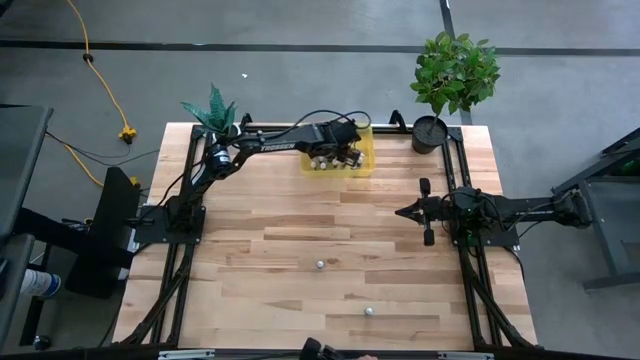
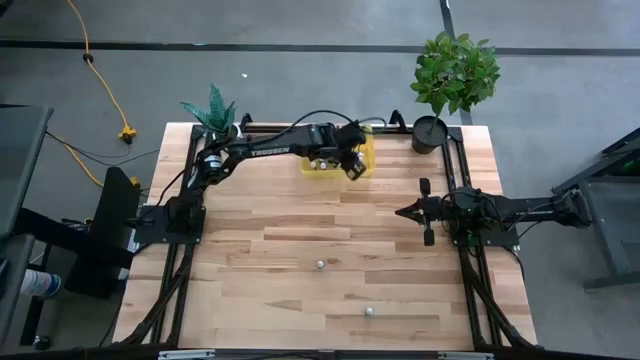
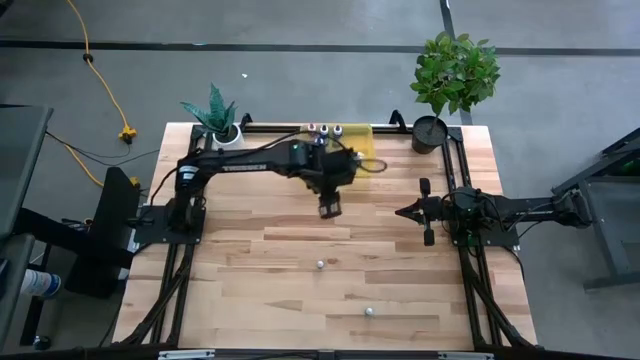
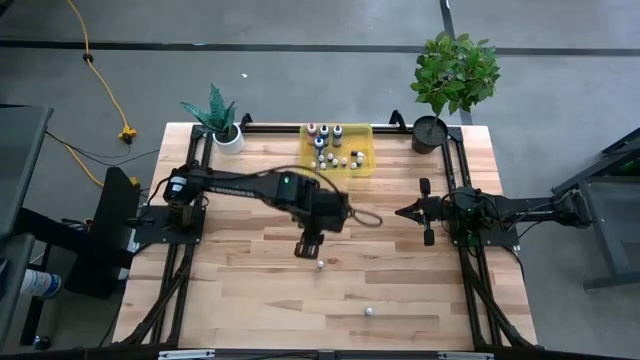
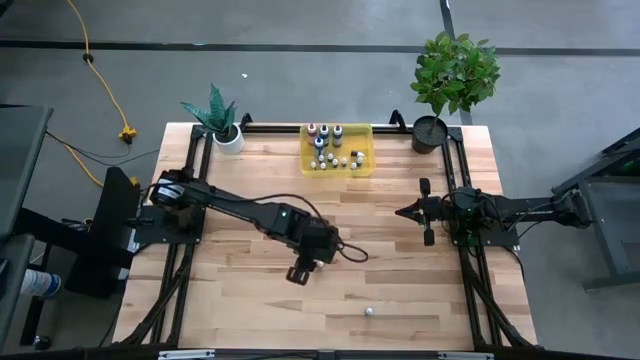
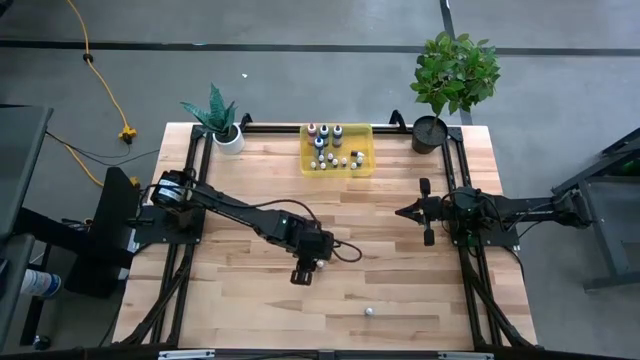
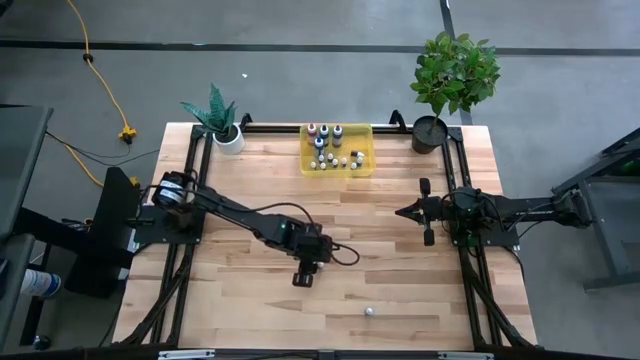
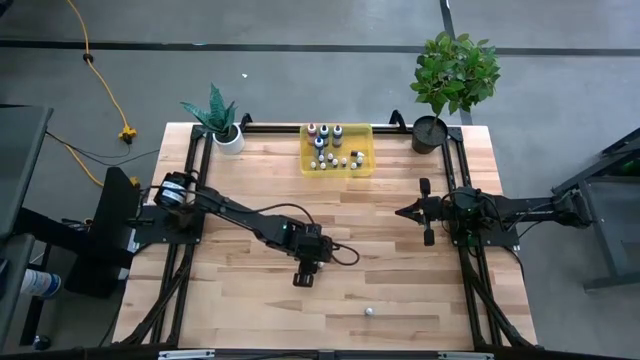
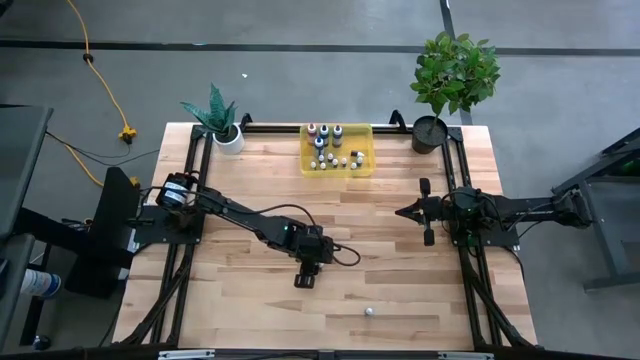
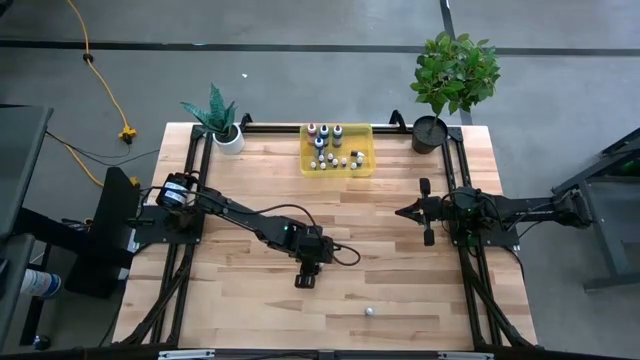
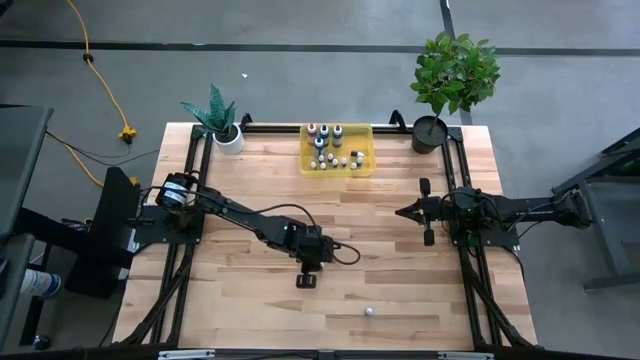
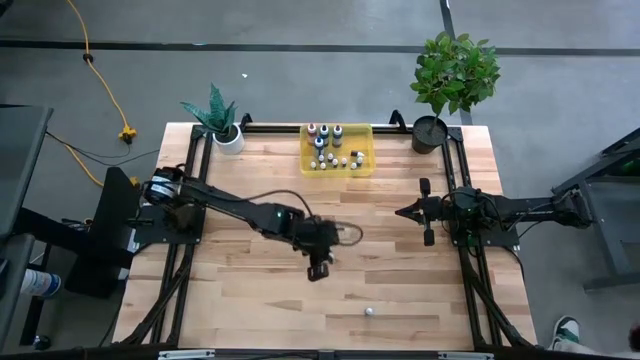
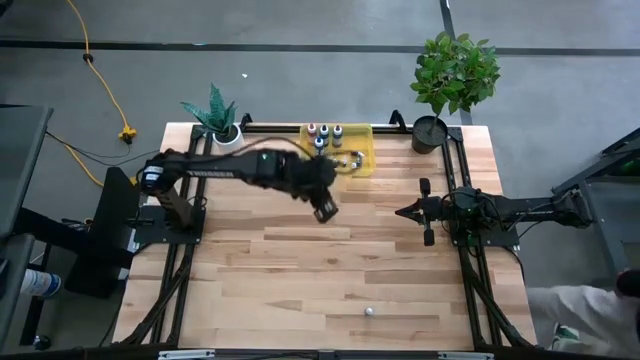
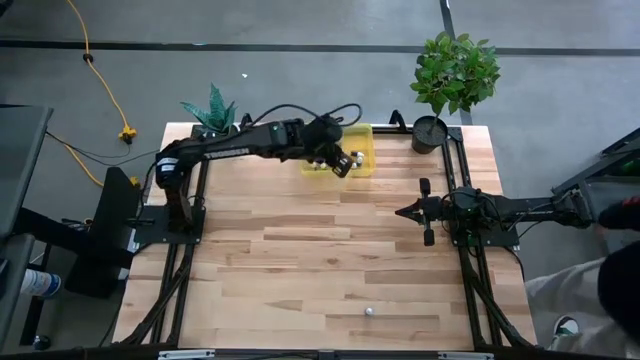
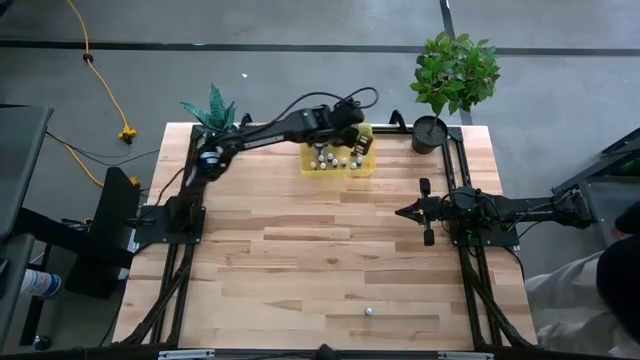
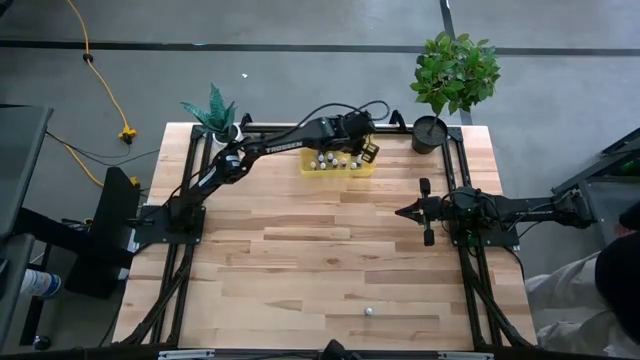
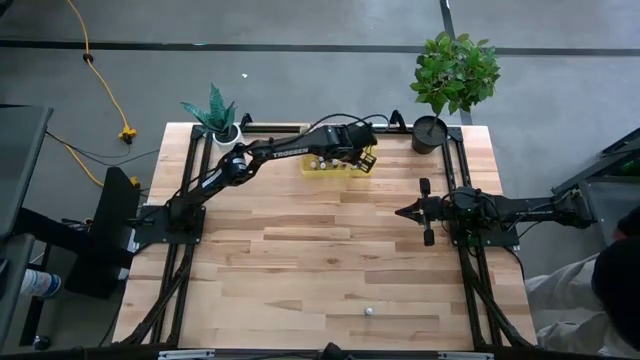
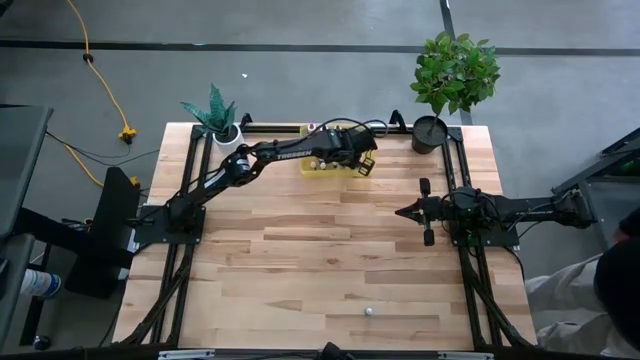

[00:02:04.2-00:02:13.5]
Task: Pick & Place food coloring
Put the small green food coloring bottle into the yellow bin

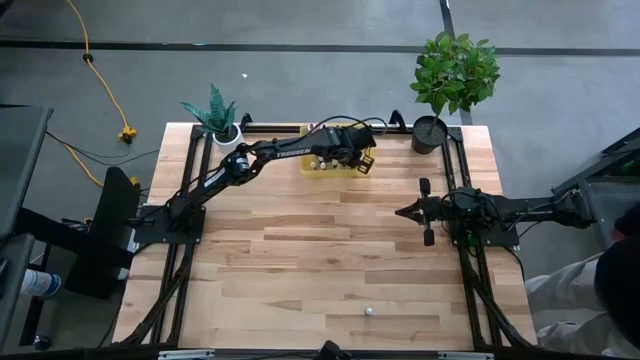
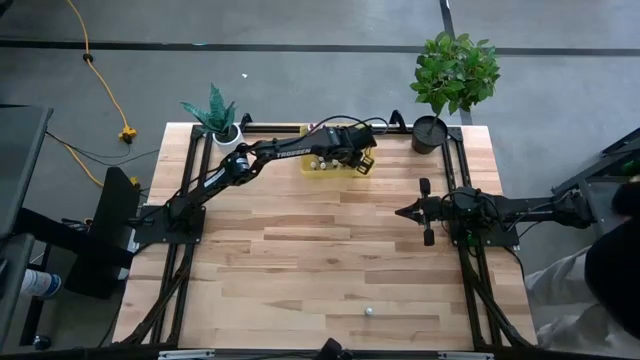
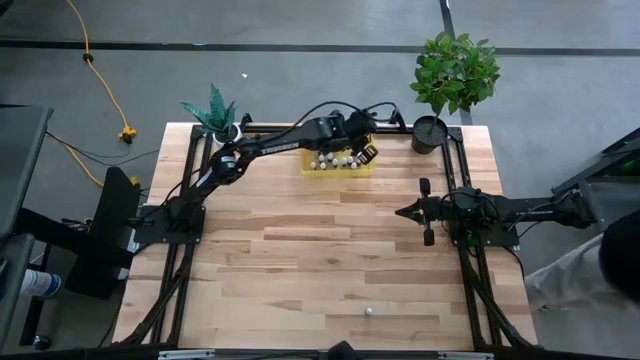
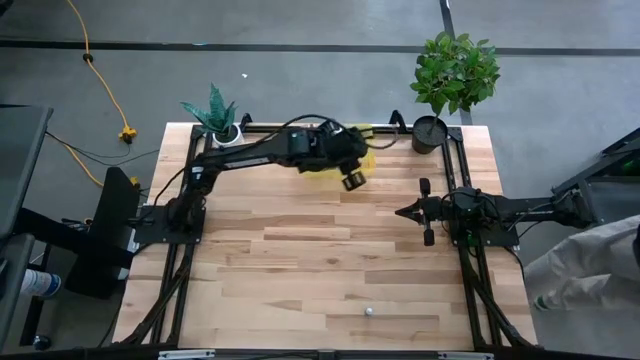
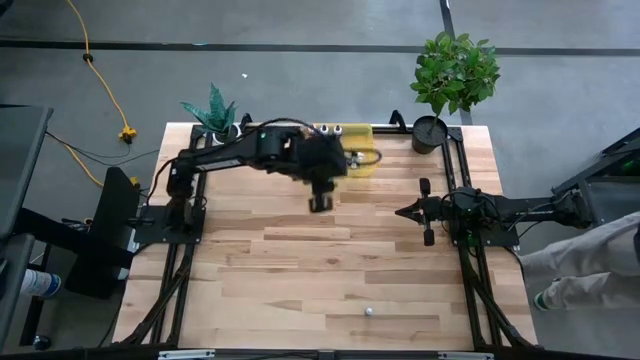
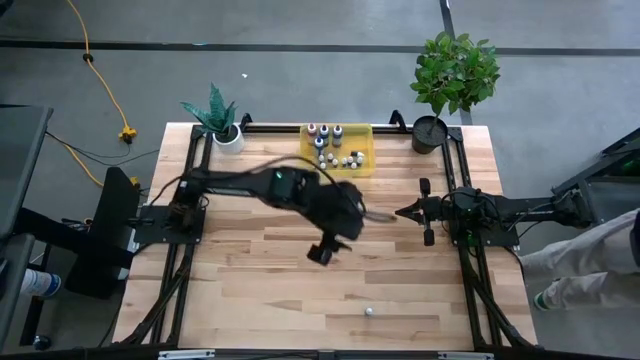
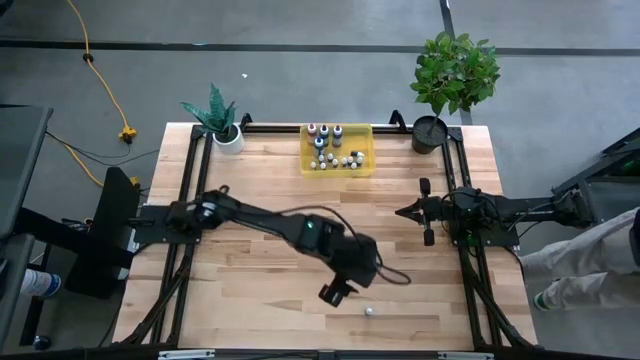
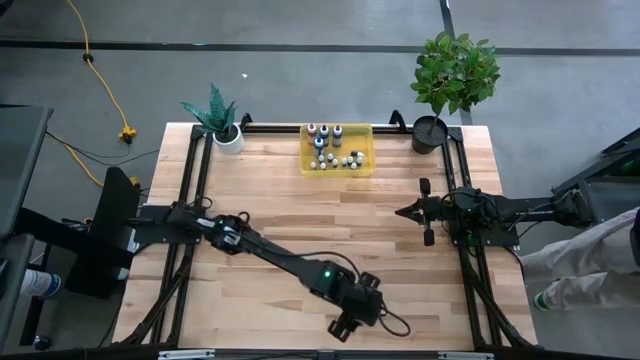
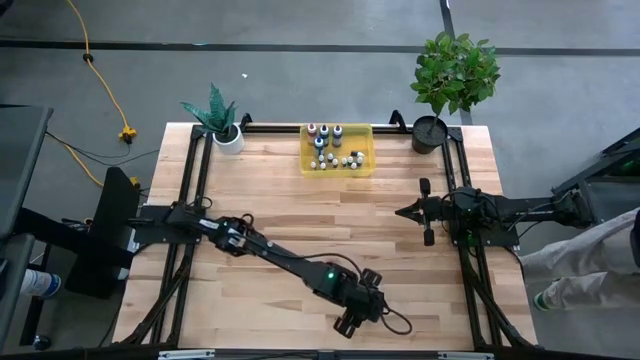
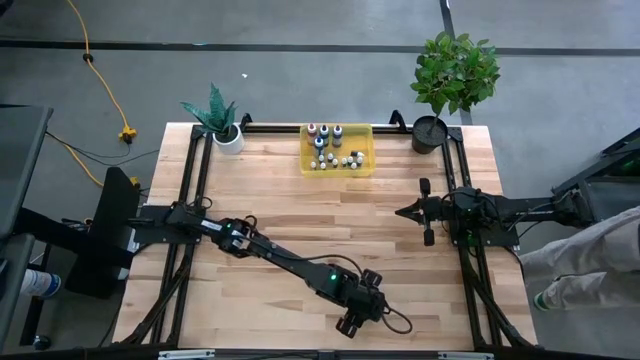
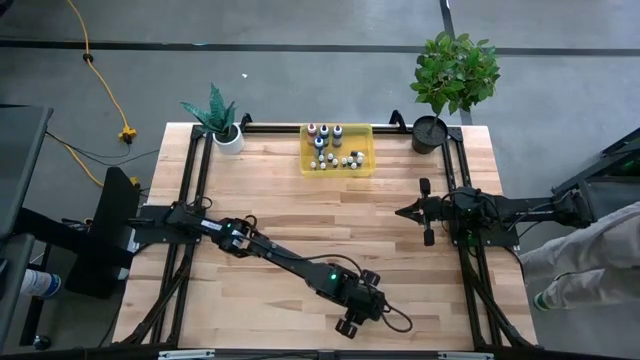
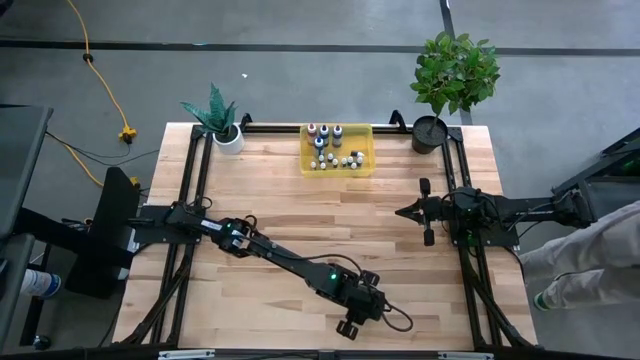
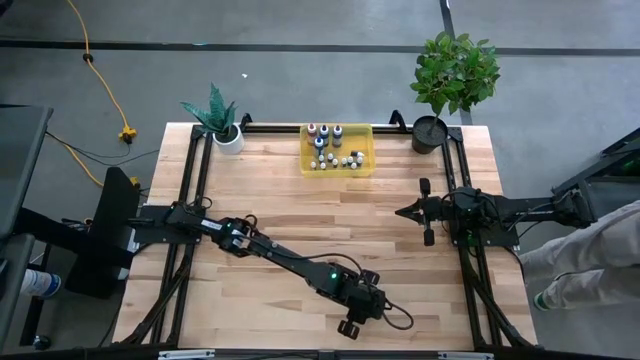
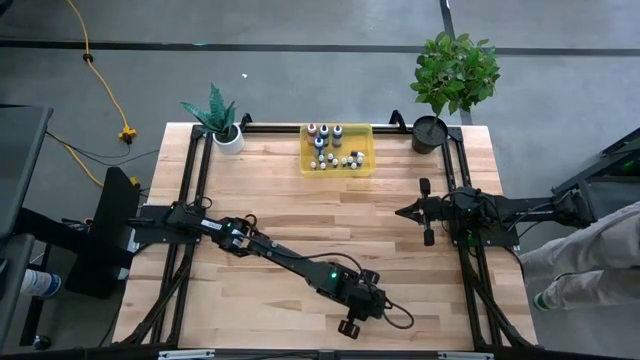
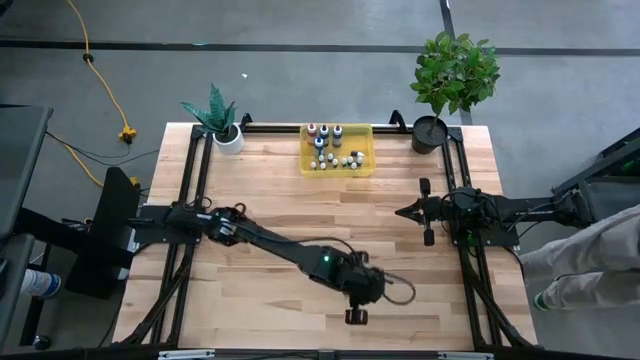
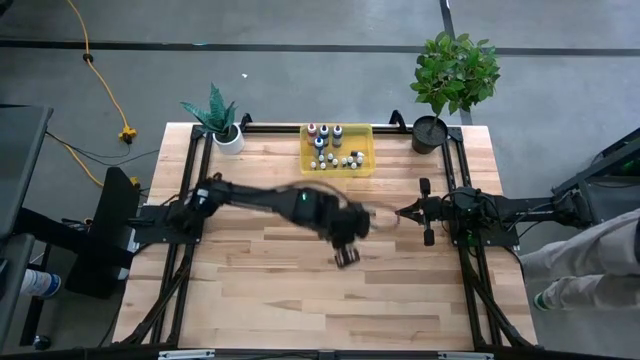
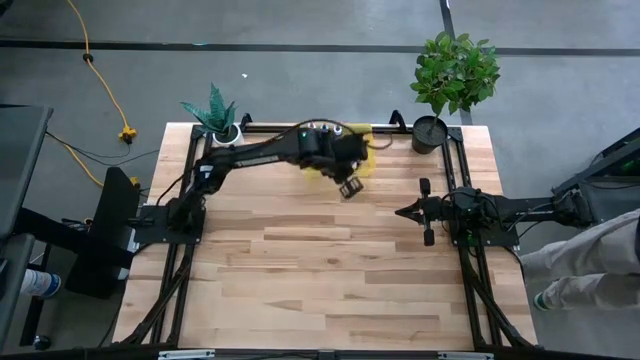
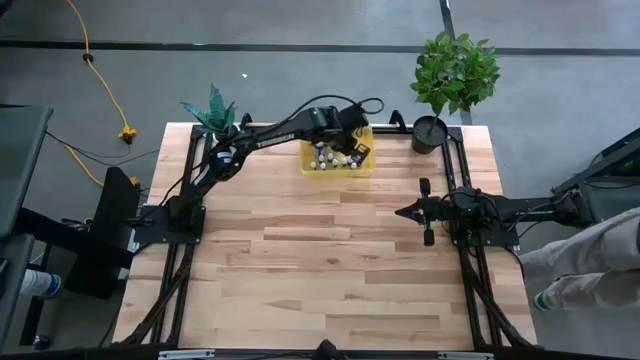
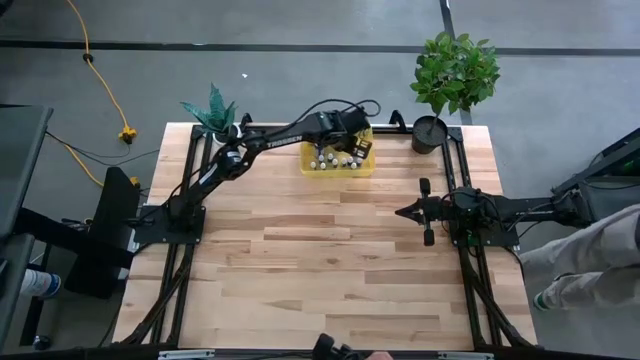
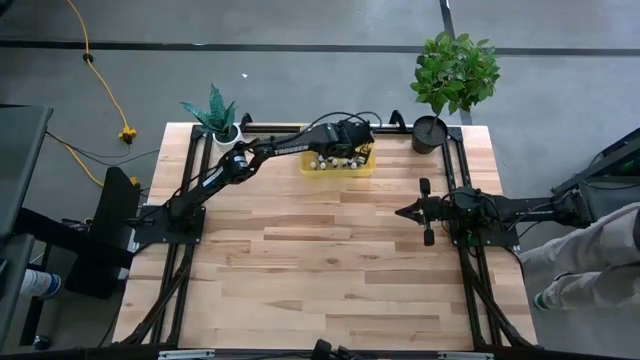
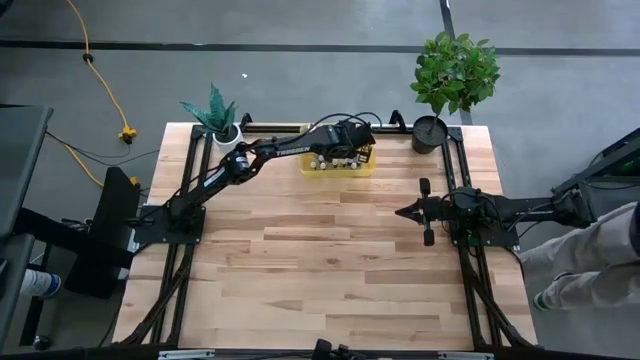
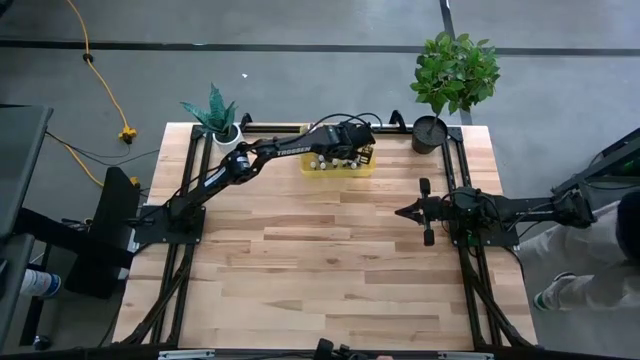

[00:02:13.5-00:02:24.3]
Put the small brown food coloring bottle into the yellow bin

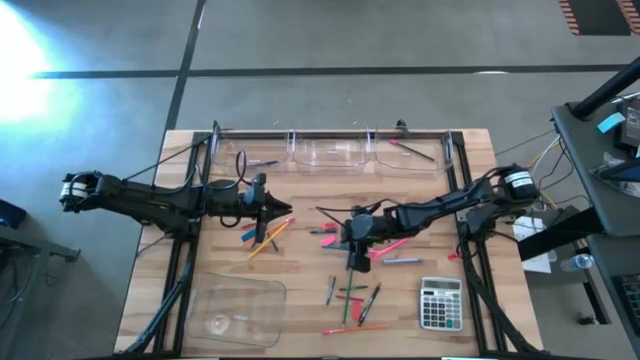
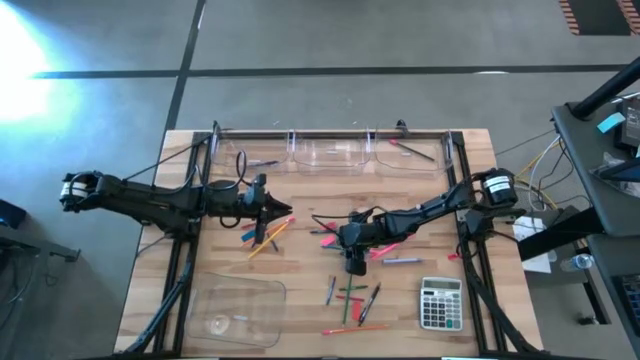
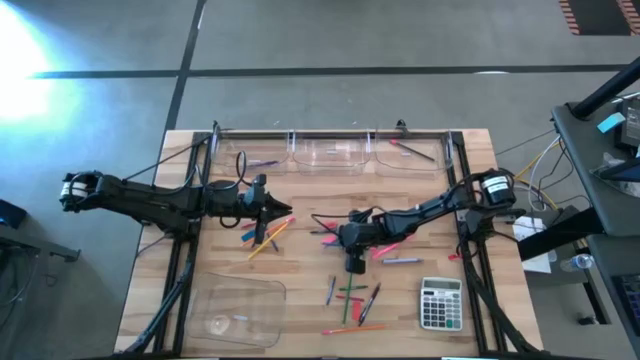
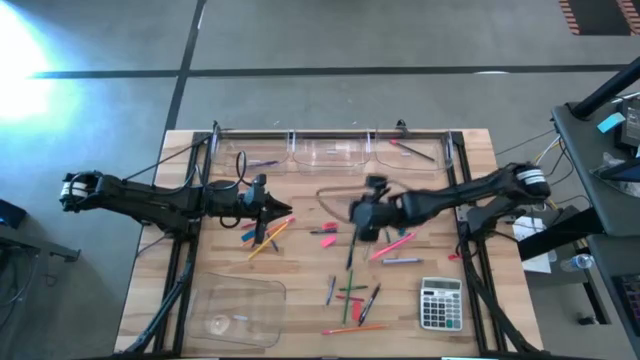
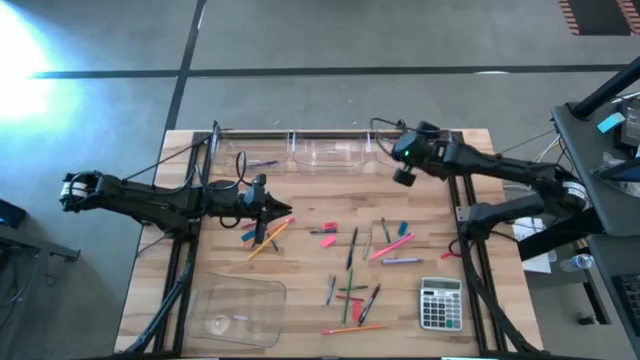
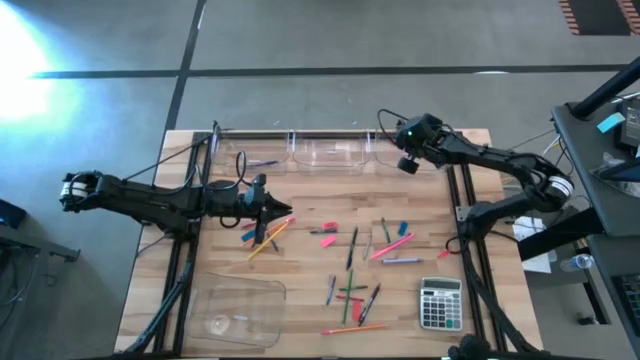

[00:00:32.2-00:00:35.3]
Task: Sort crayons/erasers/pens/pencils in bins
Put the blue pencil into the top right transparent bin
